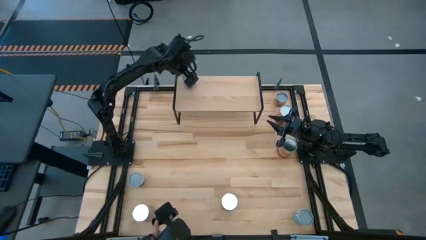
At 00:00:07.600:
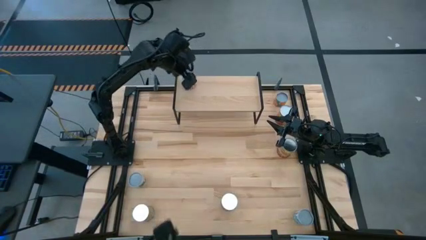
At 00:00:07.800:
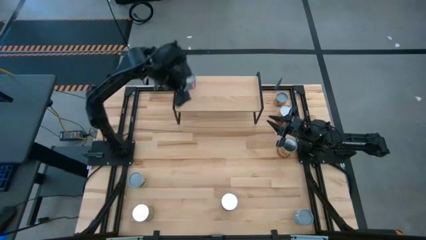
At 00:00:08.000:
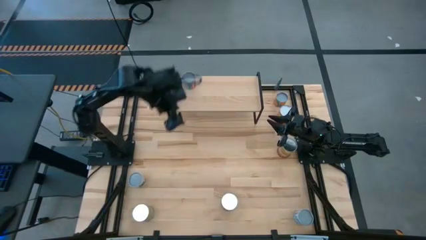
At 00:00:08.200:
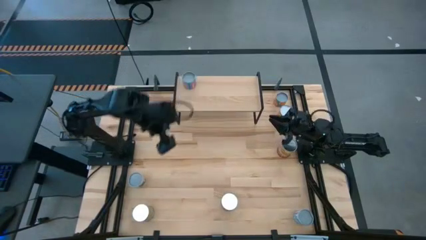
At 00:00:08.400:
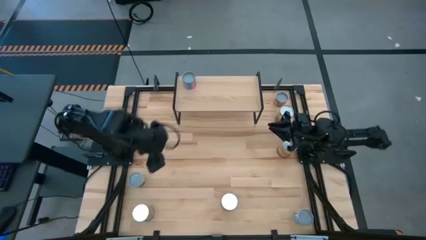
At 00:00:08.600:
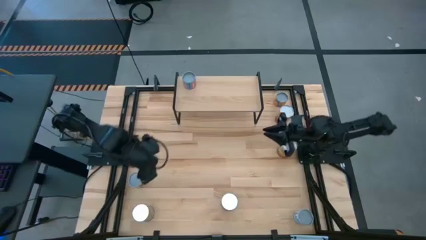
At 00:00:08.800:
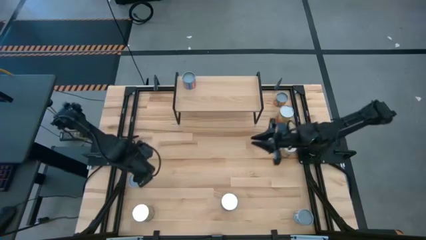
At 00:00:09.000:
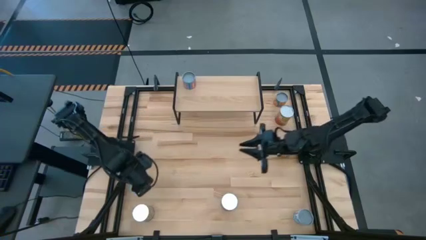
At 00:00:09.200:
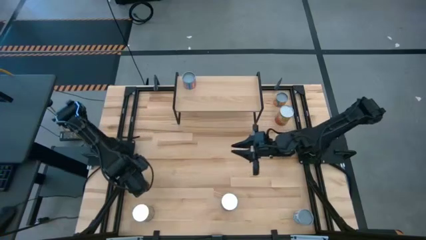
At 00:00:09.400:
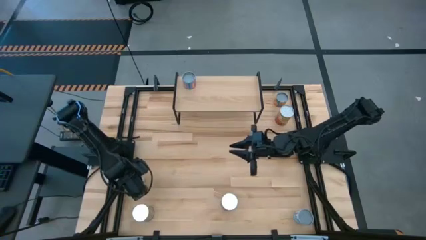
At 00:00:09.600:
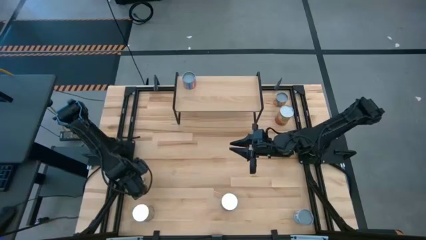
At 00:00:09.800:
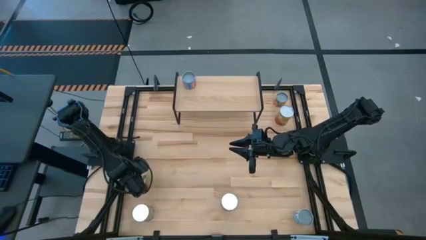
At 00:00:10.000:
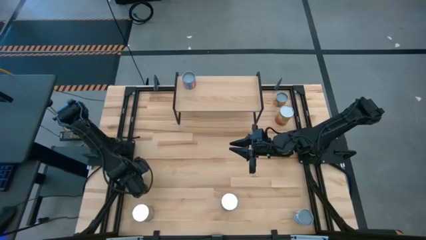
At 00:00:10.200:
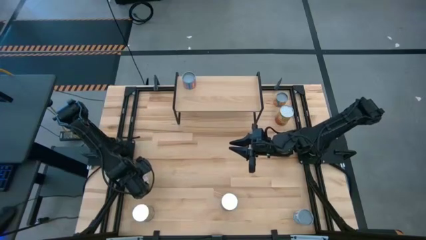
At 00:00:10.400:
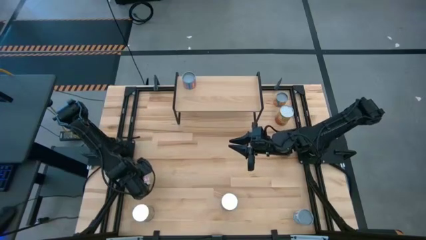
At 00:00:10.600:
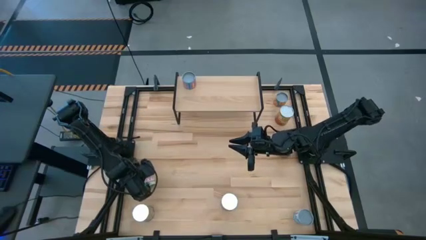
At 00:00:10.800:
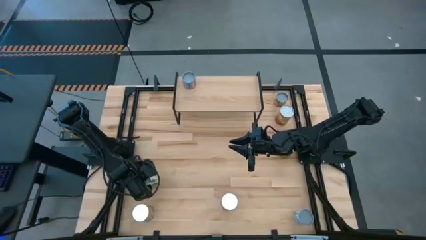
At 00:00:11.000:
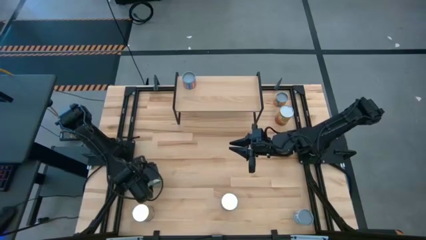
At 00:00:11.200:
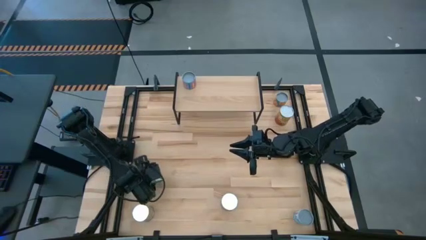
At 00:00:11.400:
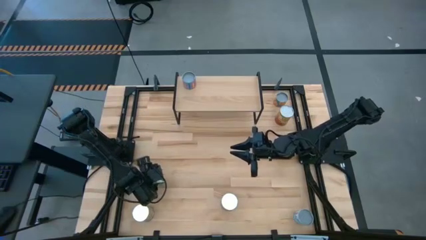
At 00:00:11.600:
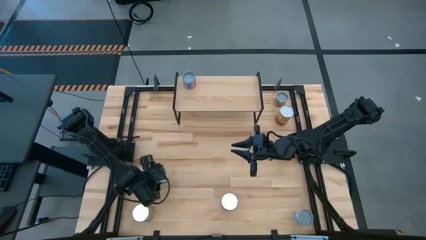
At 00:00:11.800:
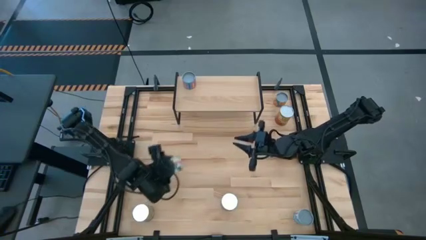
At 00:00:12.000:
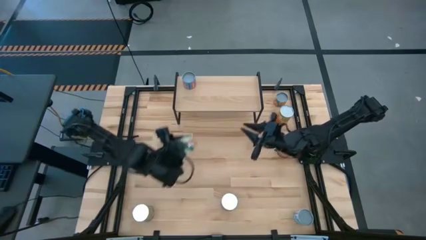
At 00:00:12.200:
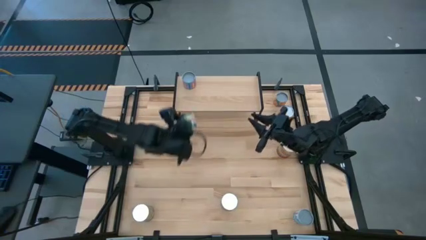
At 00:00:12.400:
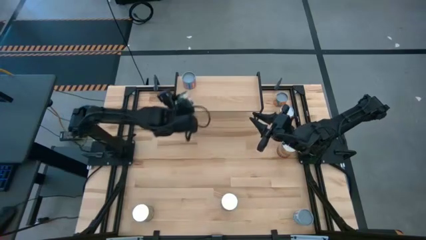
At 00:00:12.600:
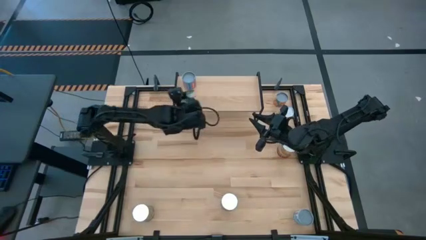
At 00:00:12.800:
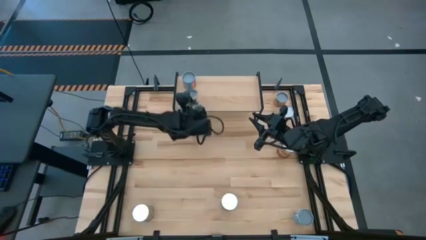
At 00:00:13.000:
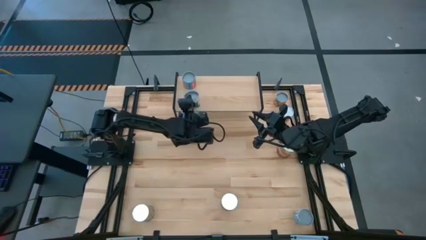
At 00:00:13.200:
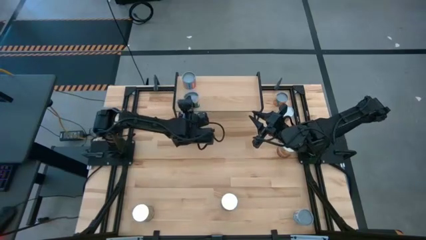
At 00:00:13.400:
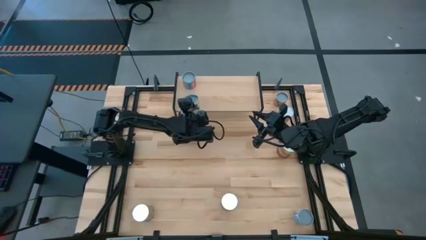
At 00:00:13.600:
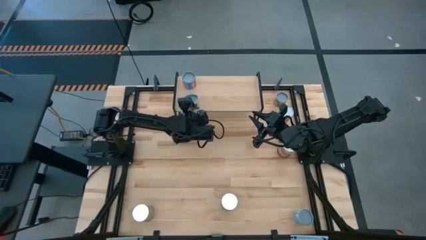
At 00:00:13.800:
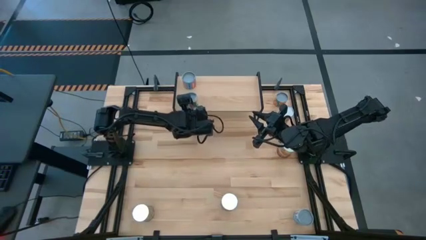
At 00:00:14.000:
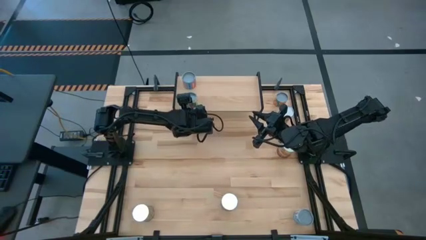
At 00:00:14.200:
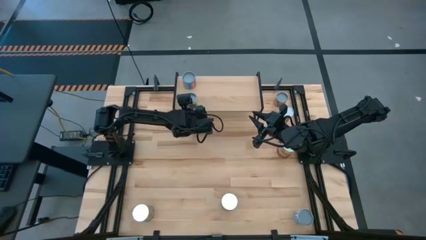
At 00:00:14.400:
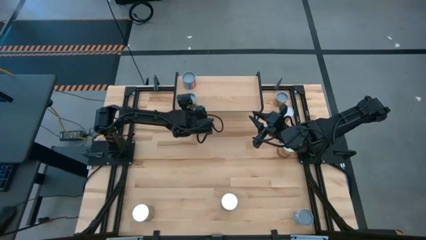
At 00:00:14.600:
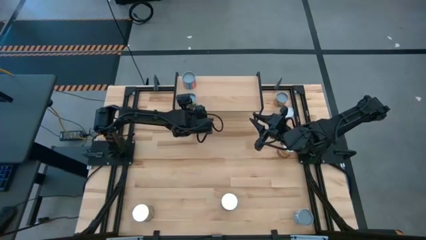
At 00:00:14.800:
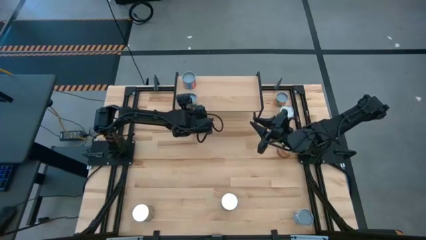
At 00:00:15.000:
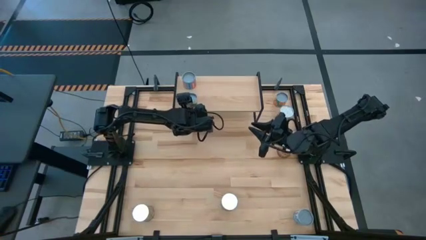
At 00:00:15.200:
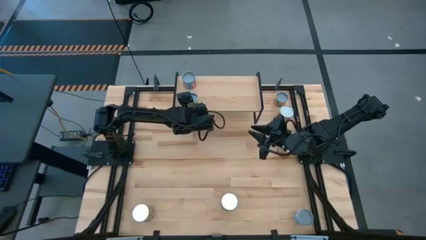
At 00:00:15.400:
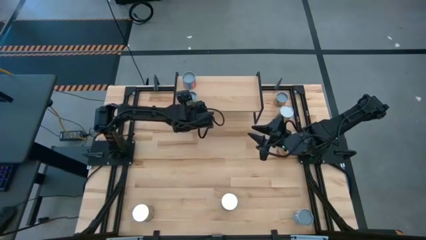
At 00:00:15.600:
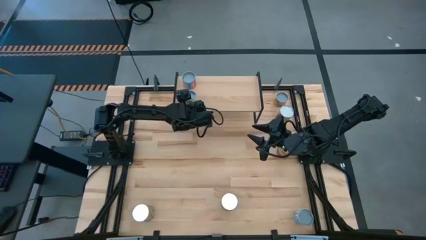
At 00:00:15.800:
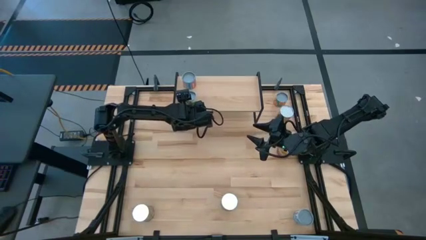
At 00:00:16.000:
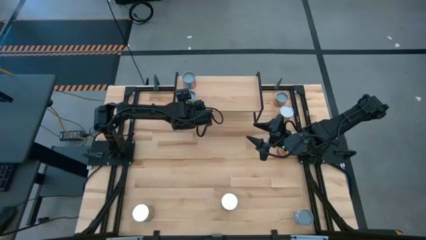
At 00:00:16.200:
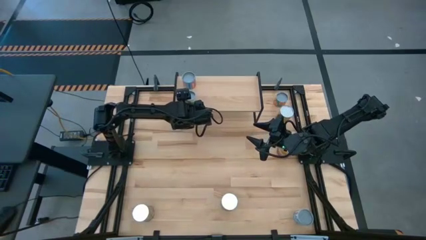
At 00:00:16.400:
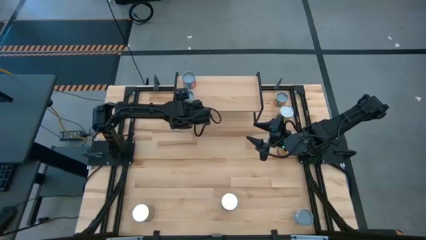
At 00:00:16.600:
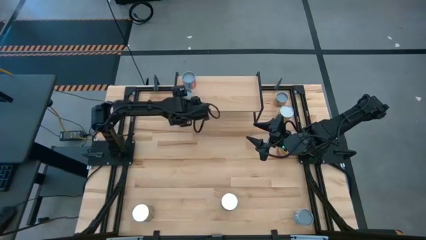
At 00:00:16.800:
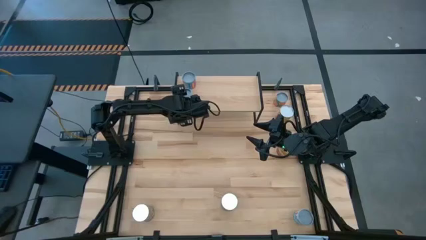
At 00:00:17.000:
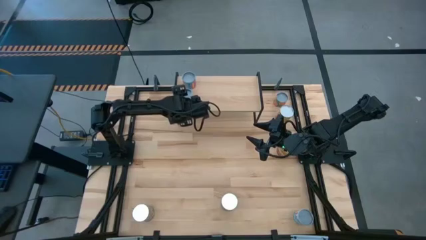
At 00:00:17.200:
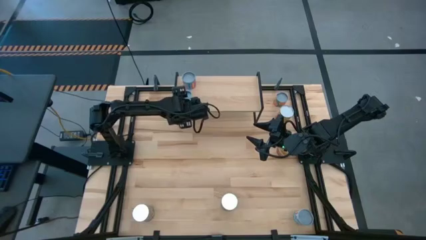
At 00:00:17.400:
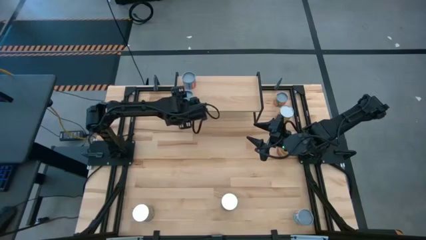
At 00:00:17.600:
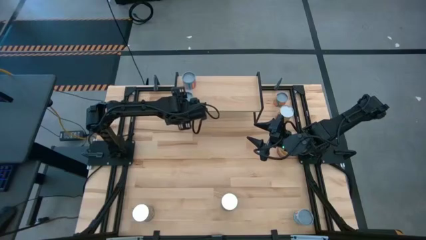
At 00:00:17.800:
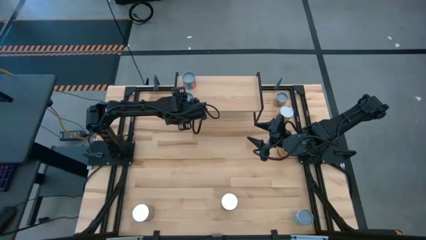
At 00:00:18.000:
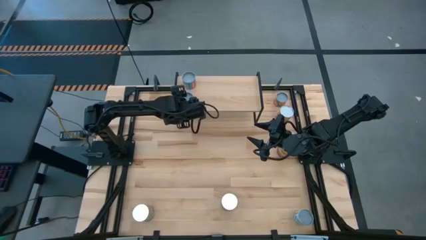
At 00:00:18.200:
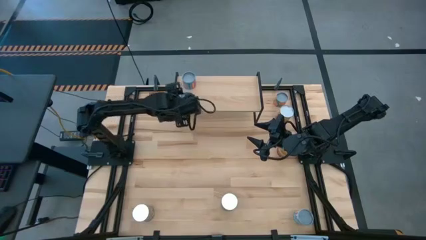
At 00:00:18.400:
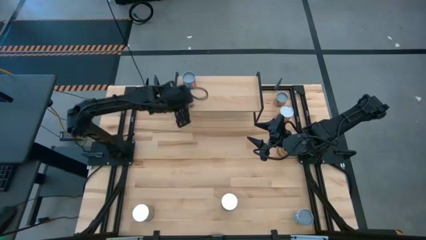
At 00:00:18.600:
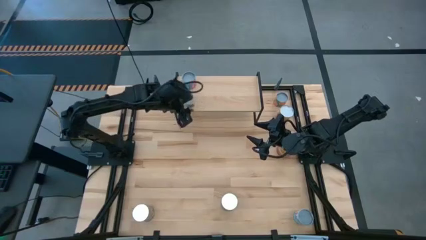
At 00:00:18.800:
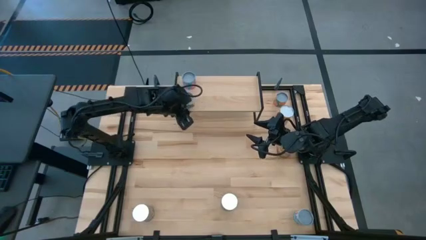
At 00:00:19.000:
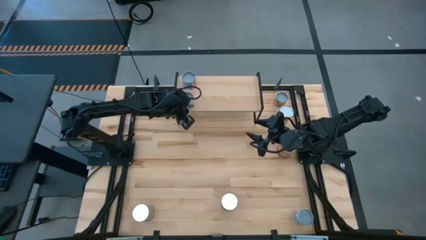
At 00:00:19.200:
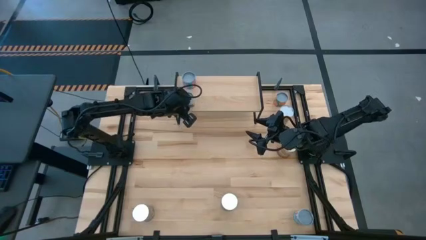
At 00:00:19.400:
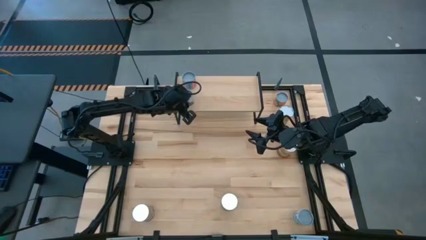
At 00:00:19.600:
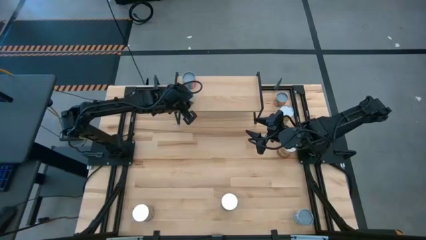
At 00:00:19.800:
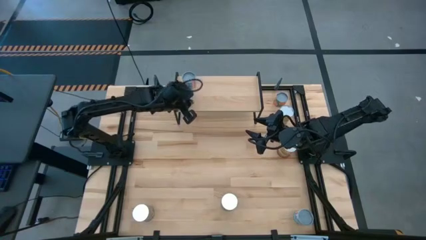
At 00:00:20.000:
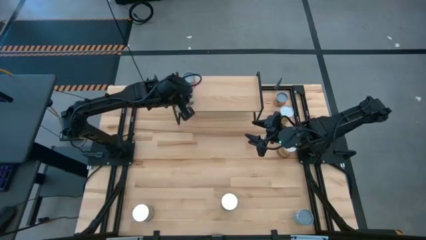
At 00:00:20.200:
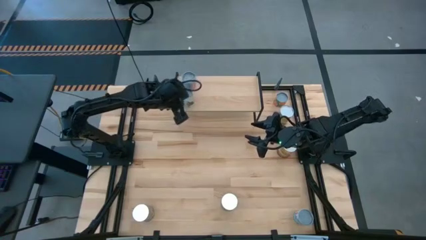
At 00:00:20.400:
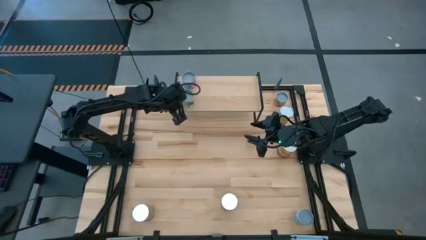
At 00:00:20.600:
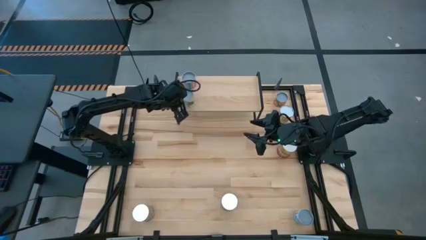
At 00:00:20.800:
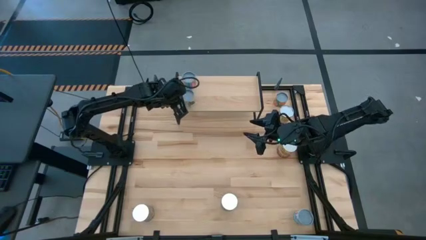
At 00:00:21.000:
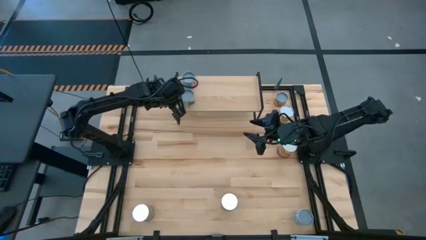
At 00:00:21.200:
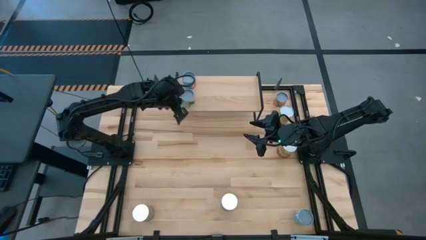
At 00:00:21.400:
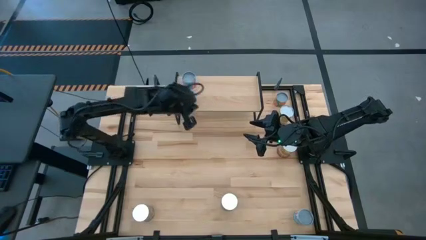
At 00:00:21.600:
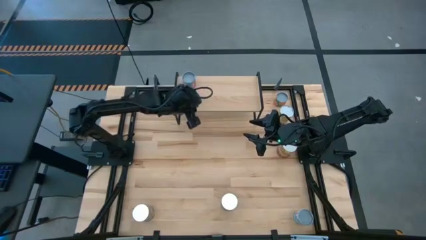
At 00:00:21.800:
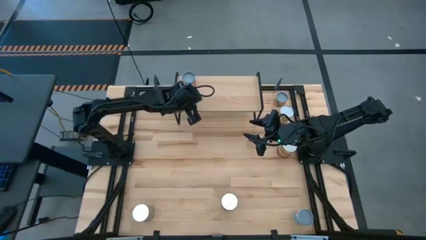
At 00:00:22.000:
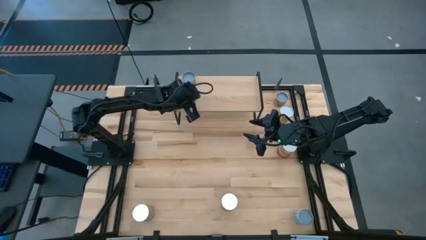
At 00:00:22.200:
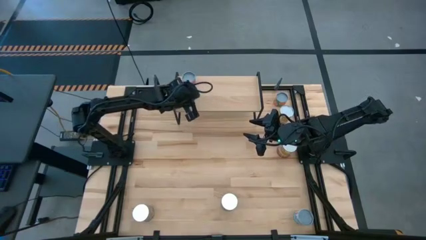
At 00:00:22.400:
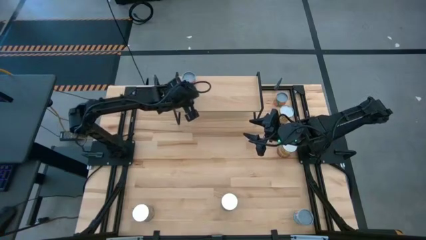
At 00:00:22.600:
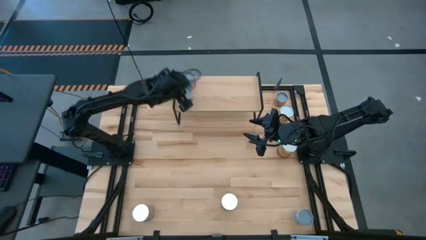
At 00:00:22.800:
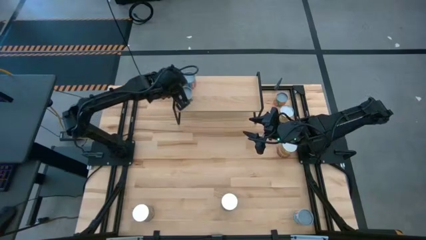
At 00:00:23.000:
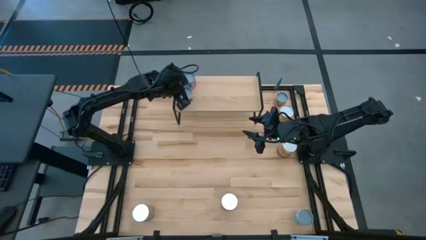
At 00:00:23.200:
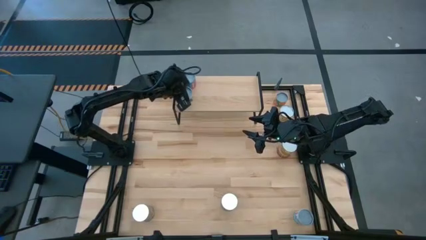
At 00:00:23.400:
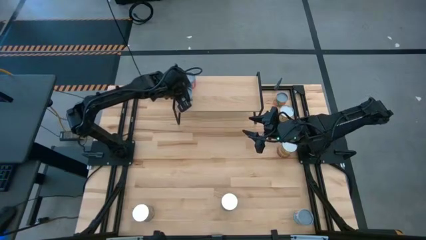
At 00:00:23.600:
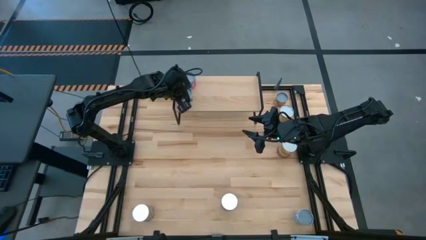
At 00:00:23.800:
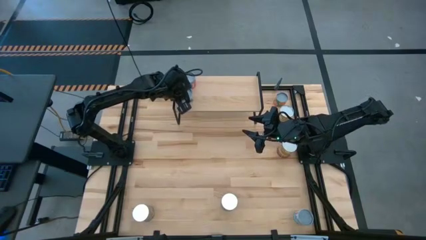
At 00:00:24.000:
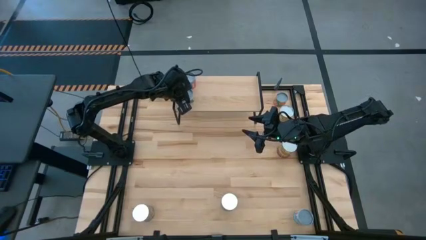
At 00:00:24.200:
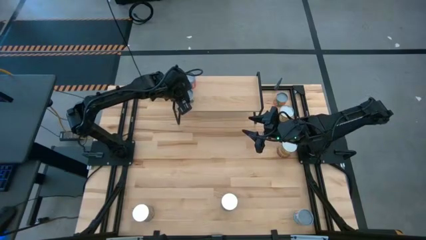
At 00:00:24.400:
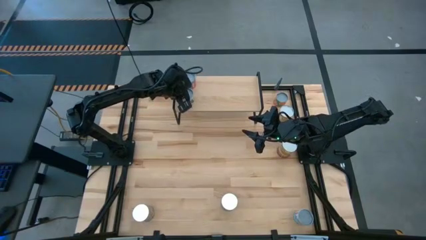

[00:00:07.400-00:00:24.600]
Task: Pick and place cans onto a shelf
Put the can of peas on the shelf aligned with the can of corn
